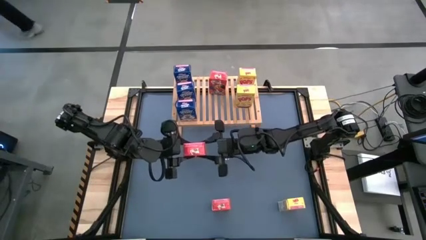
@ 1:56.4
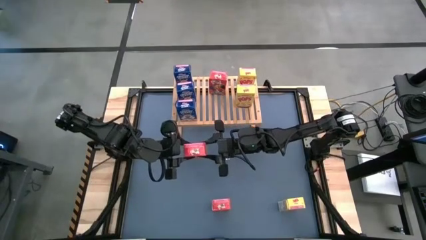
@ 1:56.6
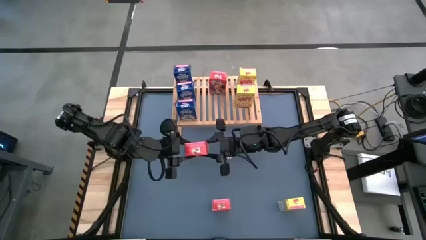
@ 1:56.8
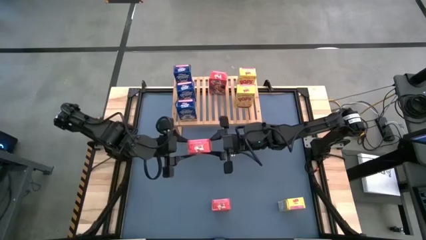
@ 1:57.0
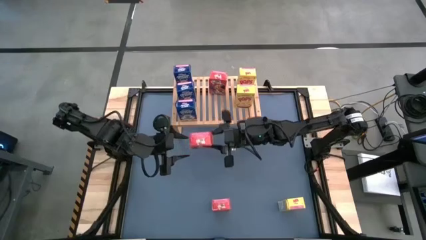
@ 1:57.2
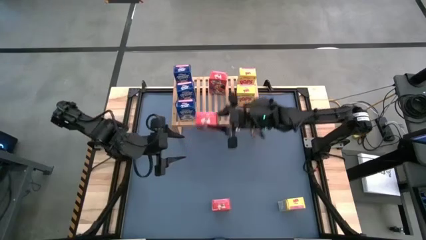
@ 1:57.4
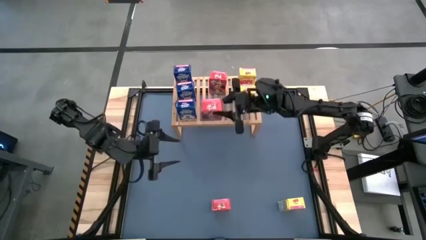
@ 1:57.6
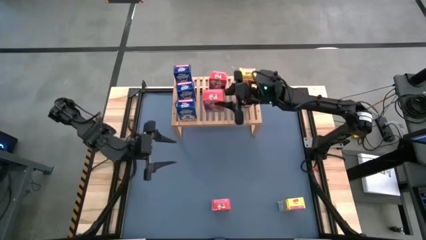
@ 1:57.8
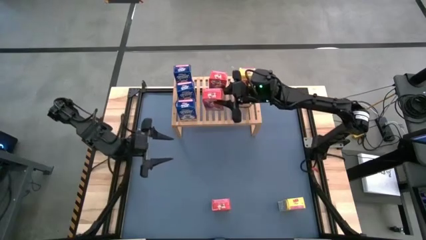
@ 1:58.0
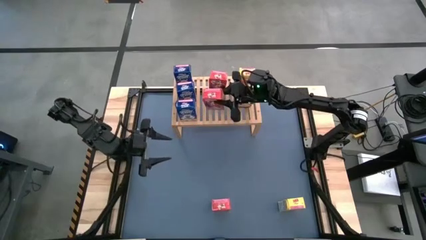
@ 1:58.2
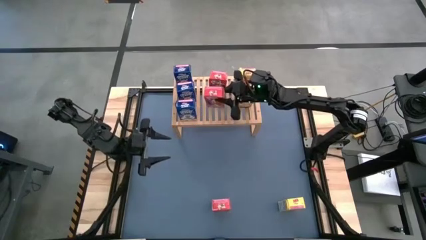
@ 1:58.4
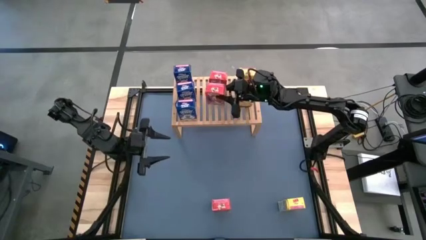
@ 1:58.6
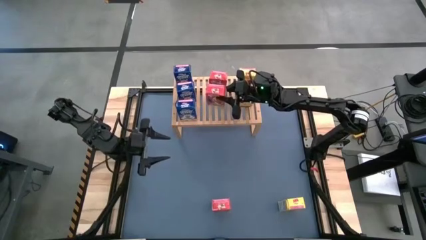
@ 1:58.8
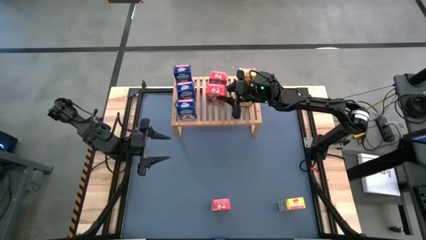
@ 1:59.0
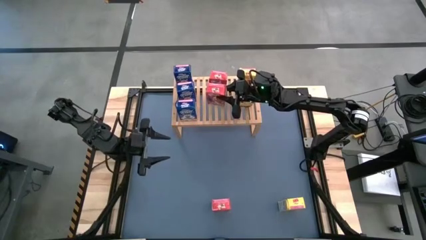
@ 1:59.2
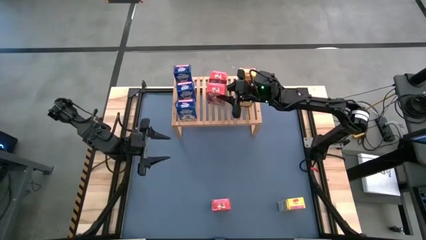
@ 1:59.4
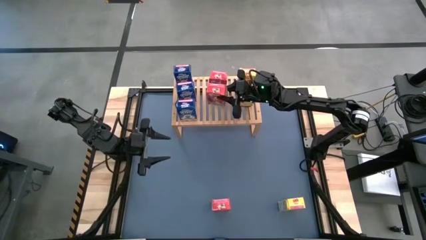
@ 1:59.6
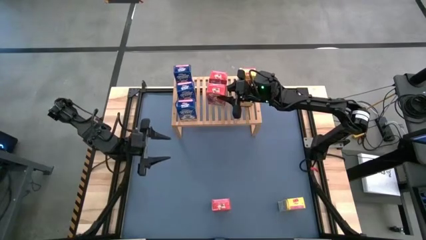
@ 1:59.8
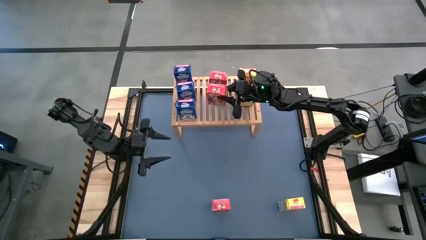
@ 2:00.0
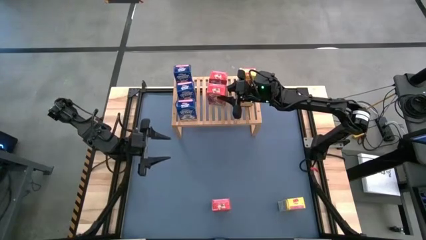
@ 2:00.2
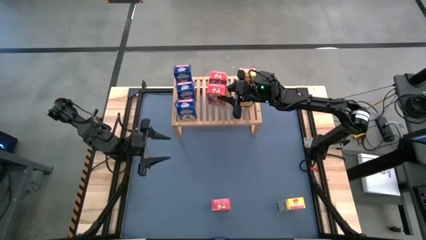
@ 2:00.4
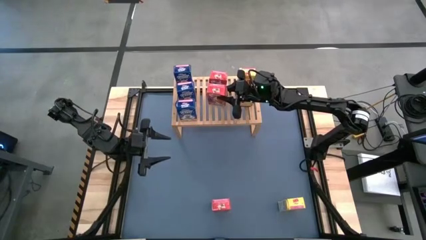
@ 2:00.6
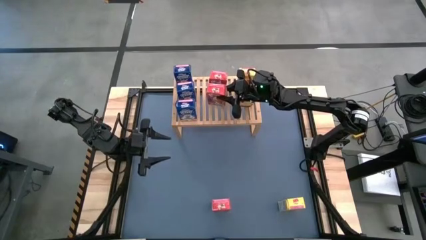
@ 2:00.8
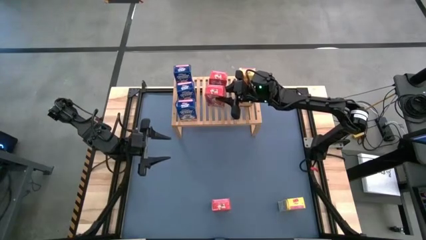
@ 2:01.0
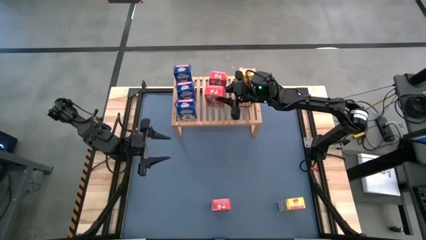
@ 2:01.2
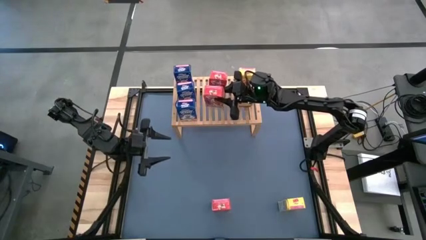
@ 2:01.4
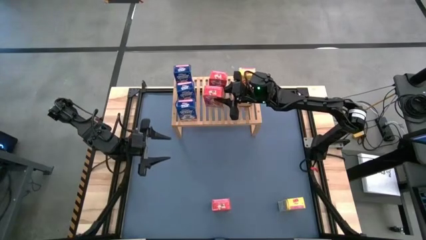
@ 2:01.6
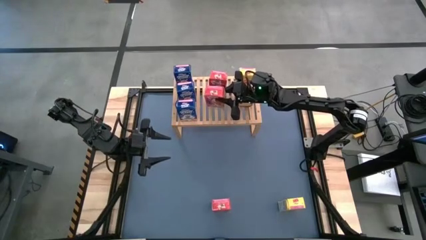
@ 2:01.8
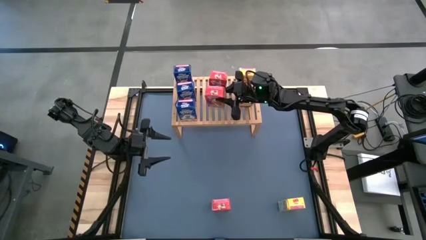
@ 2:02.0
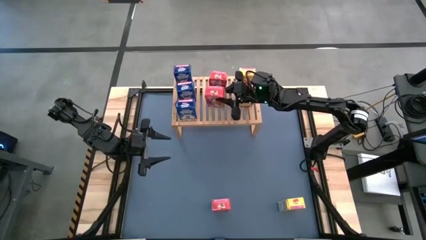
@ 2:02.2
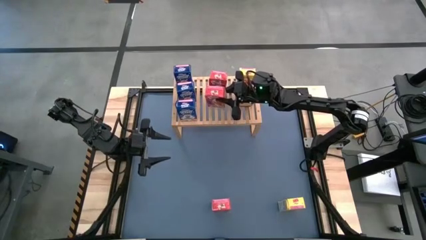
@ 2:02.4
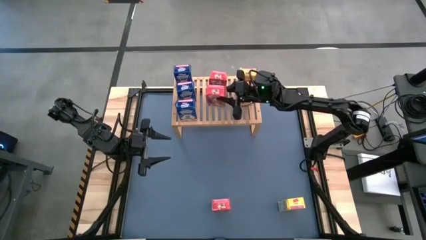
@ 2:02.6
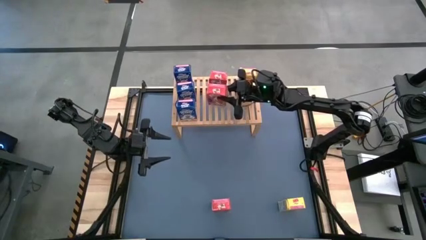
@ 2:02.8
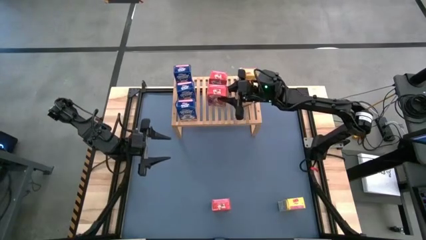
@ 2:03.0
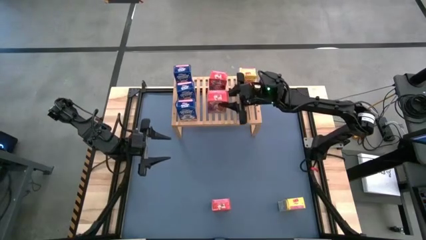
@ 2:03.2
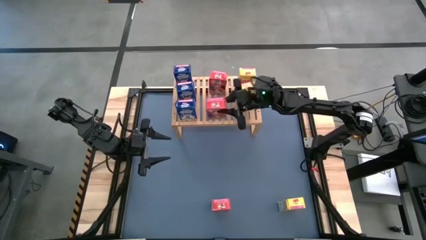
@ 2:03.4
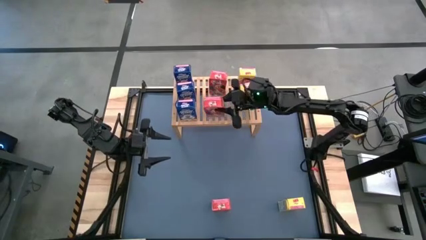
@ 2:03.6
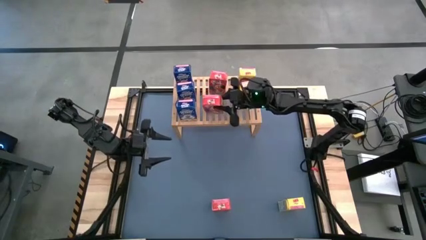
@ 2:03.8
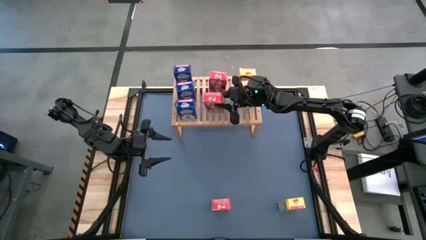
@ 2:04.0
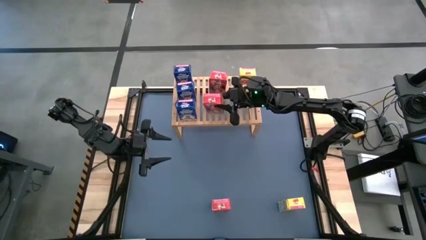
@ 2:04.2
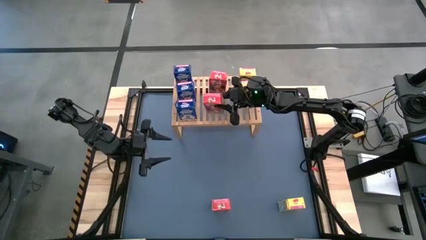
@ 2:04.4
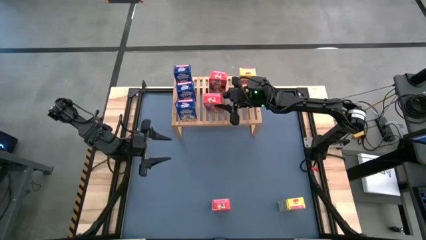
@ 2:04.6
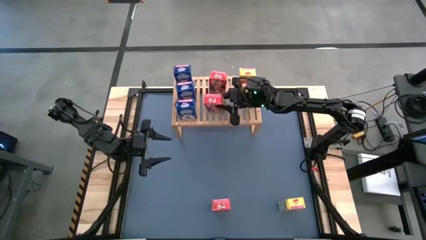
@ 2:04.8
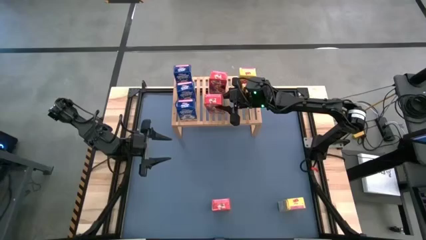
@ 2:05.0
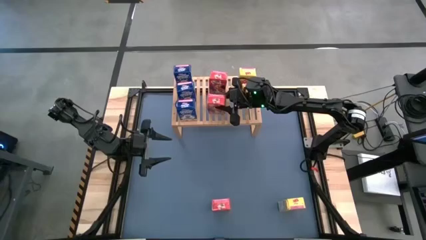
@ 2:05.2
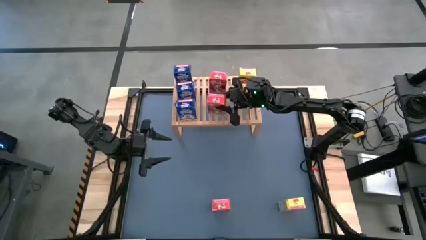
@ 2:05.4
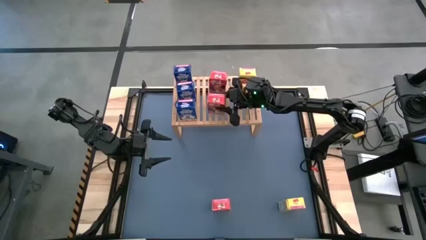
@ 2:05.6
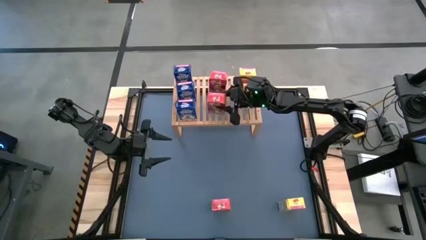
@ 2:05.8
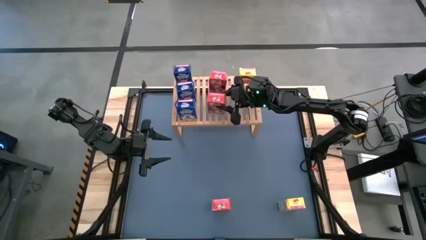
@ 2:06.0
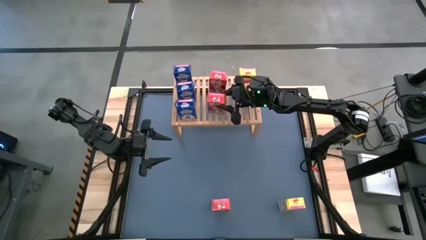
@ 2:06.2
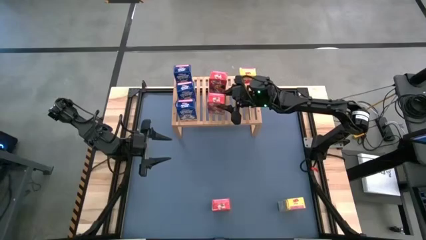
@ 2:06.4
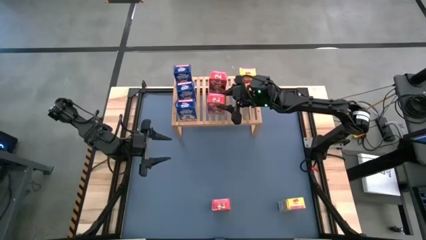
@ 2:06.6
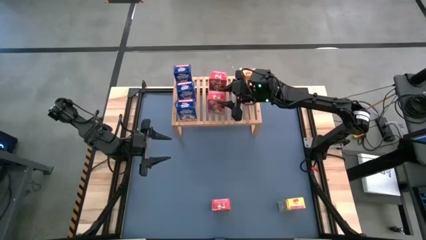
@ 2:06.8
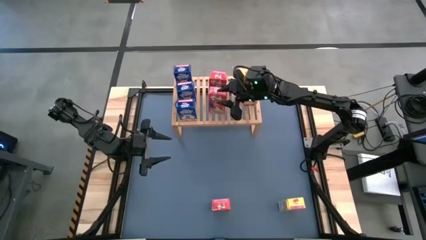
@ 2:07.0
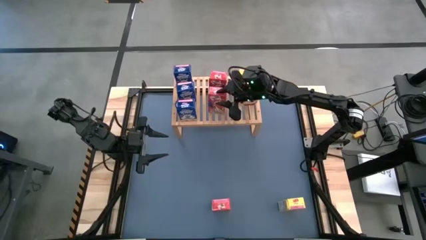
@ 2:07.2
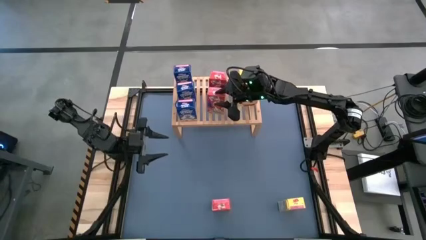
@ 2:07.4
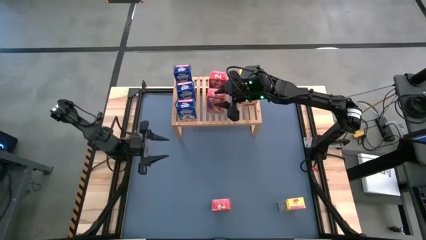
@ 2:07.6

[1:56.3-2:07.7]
Task: Stack cereal on shelf
Put the left red cereal box on the shelf aligned with the other red cereal box

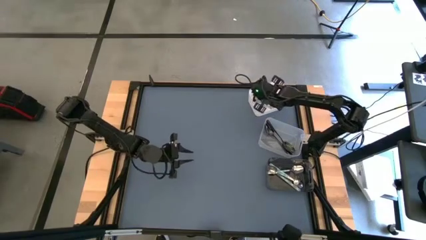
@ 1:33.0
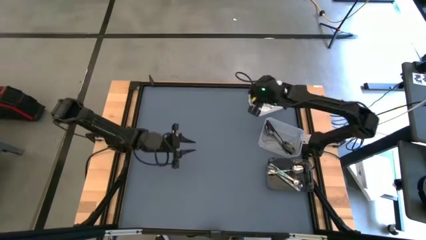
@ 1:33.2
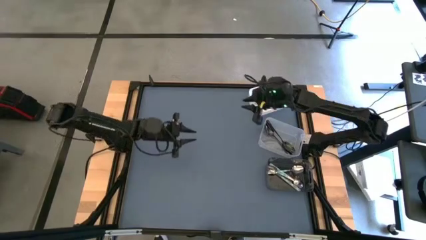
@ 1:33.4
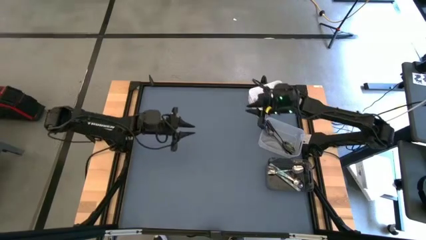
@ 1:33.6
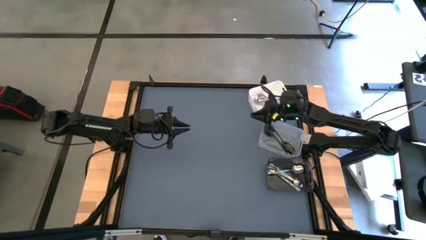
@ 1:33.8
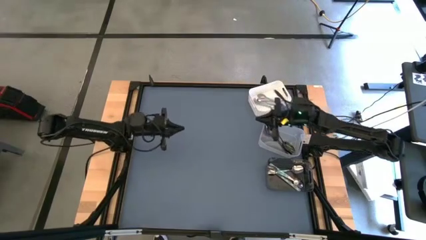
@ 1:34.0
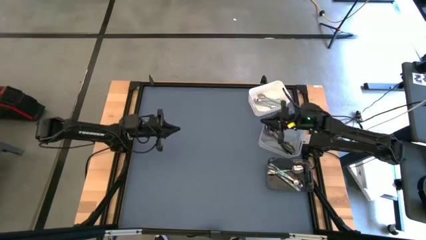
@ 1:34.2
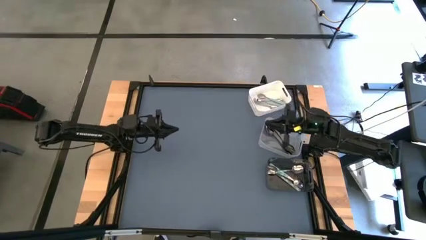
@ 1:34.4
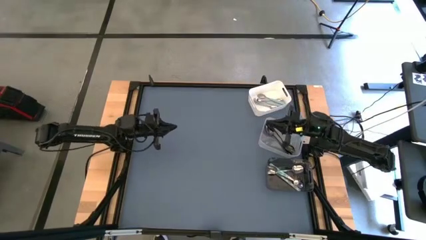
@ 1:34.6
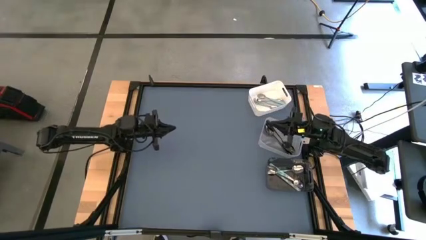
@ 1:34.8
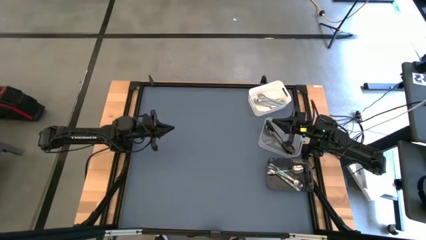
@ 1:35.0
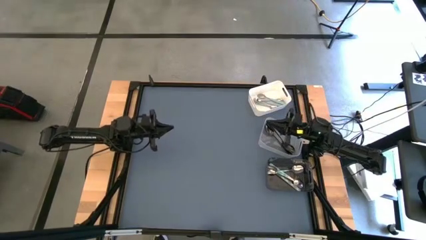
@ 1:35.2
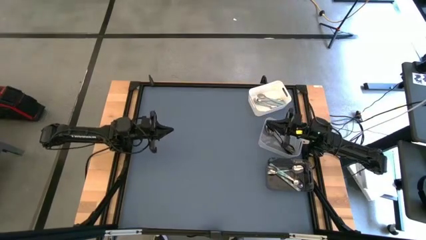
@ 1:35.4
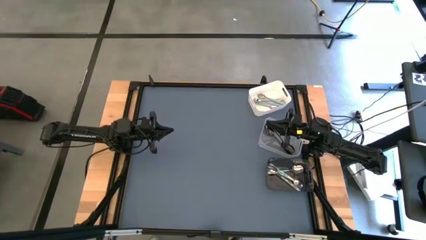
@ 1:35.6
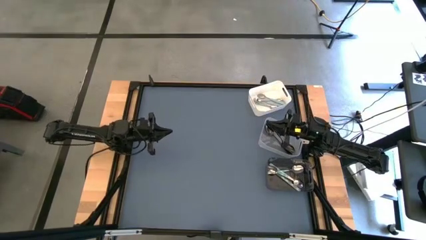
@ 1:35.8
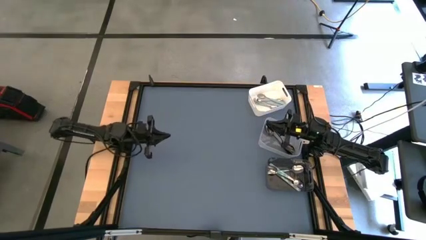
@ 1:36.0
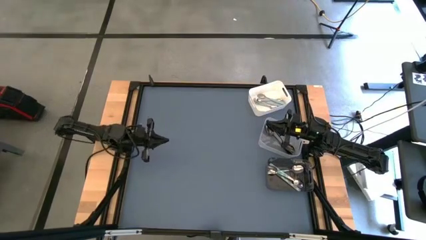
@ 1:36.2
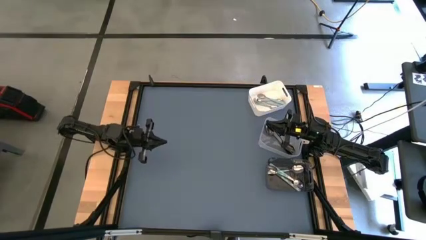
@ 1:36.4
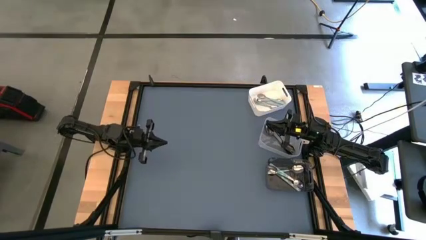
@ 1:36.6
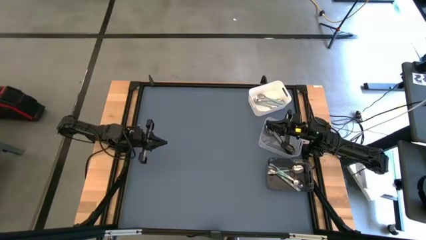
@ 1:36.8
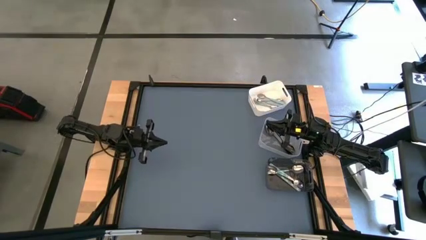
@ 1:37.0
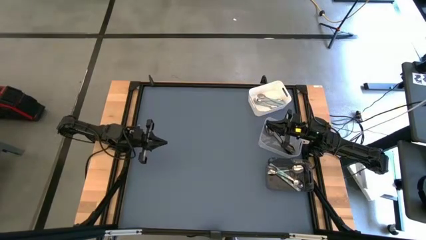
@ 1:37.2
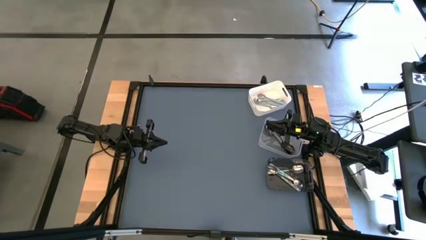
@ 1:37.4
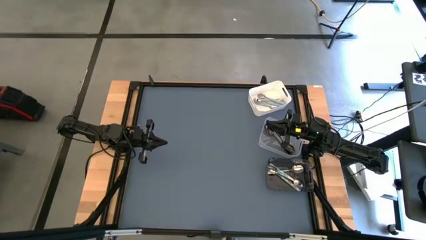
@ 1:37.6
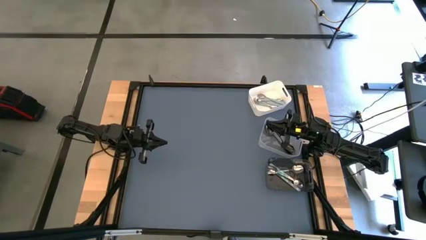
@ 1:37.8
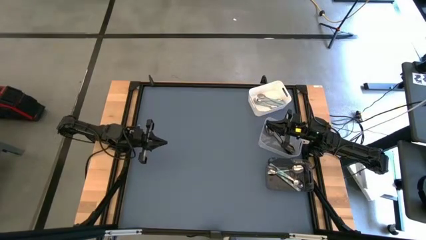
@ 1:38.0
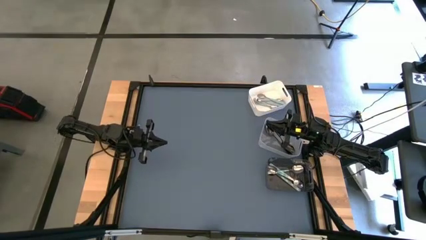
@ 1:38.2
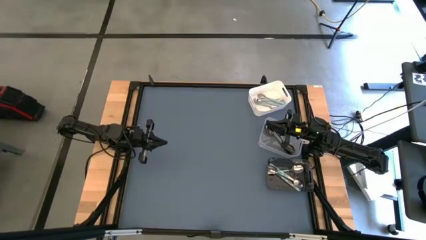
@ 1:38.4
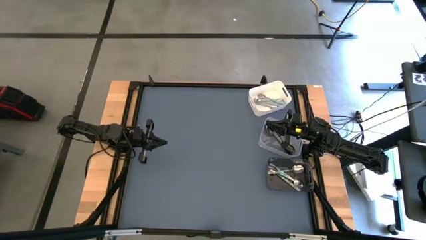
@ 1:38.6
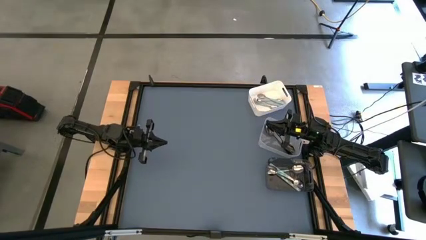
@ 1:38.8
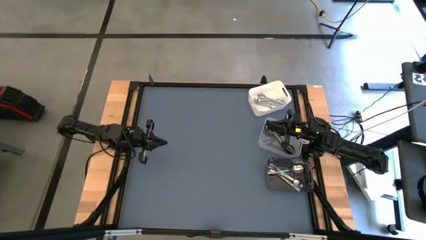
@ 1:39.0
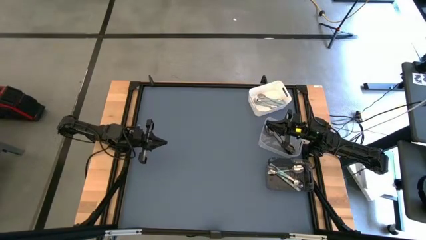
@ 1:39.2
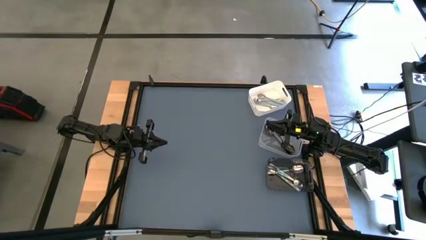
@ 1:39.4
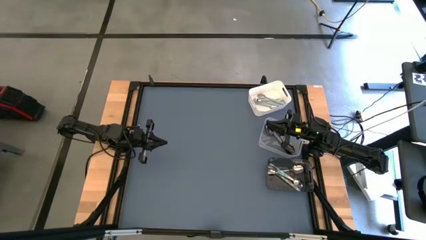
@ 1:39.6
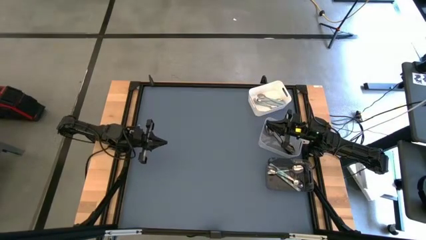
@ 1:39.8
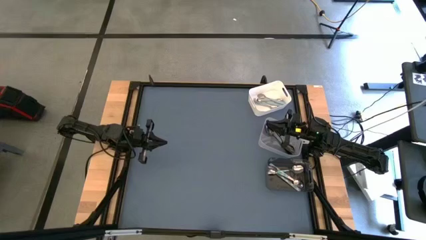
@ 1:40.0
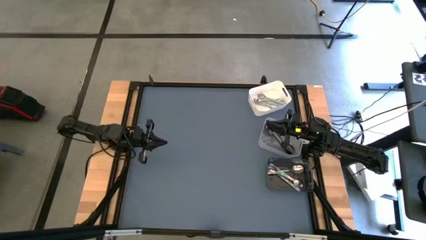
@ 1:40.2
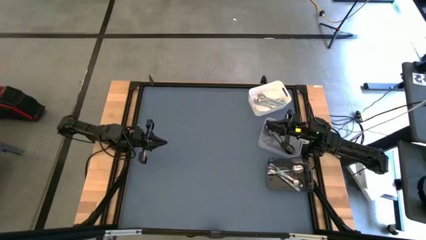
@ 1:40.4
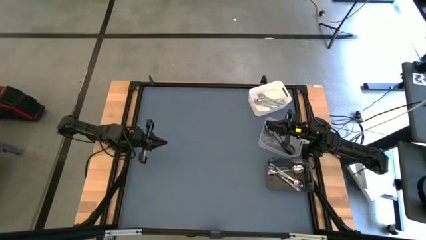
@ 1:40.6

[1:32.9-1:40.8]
Task: Sort silverware by color (type)
Return to Home Position
